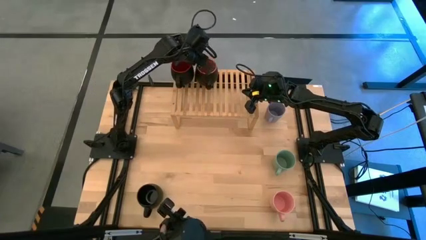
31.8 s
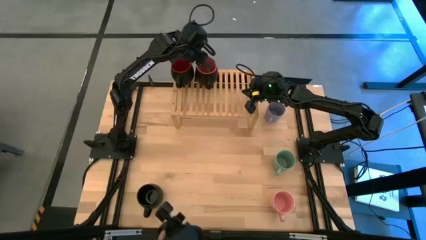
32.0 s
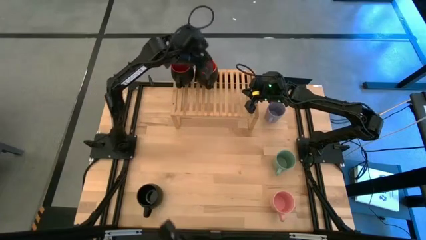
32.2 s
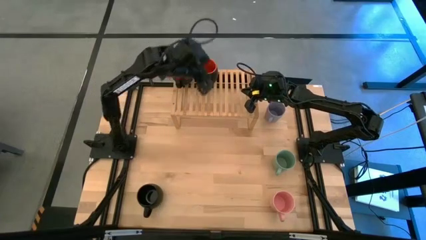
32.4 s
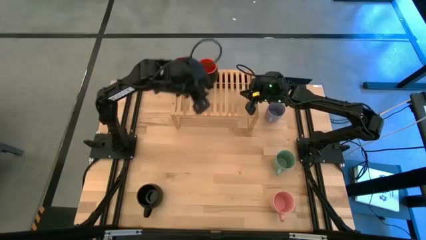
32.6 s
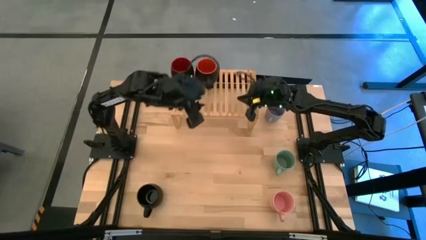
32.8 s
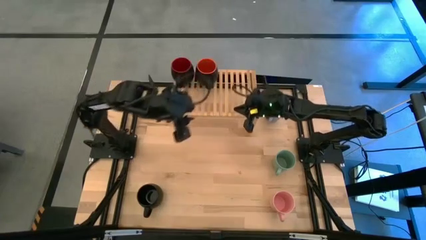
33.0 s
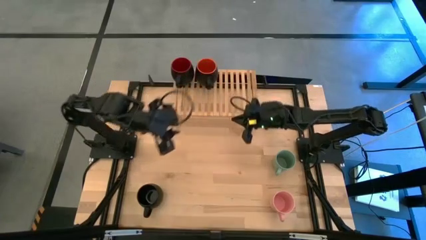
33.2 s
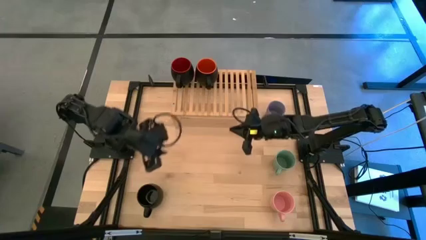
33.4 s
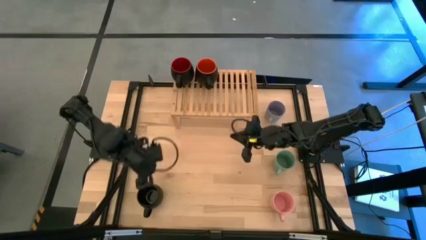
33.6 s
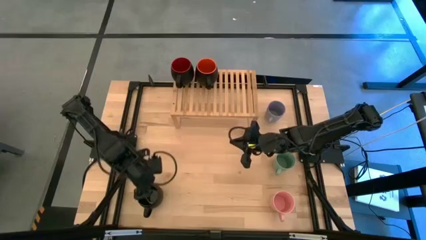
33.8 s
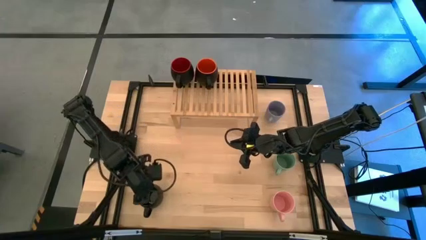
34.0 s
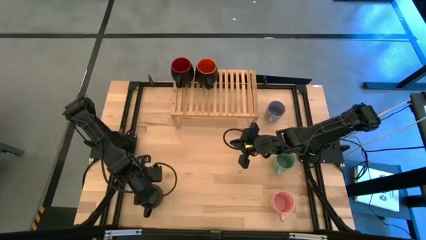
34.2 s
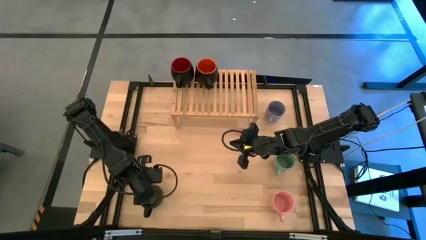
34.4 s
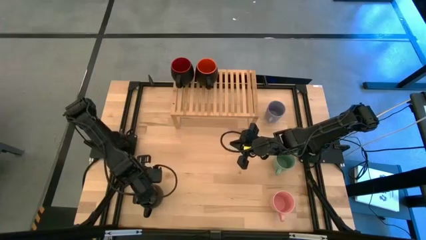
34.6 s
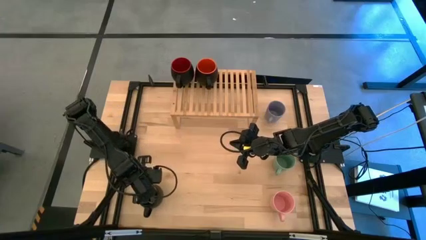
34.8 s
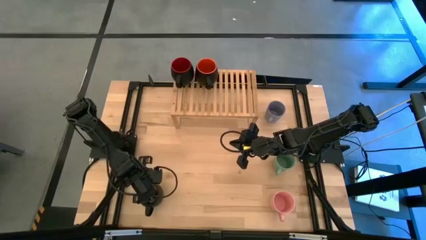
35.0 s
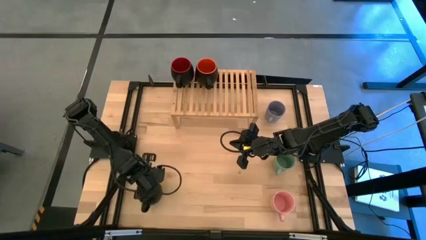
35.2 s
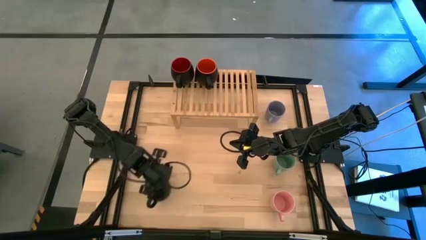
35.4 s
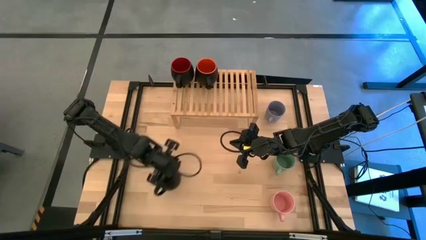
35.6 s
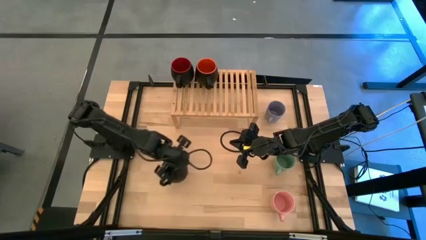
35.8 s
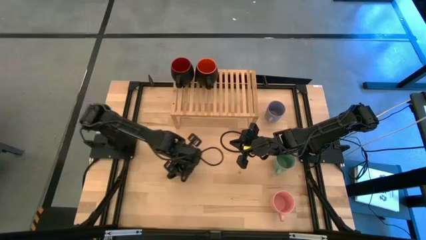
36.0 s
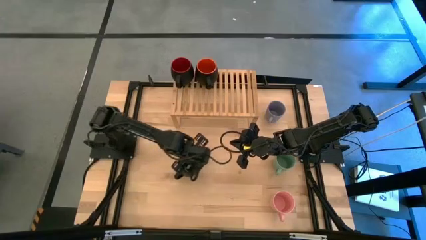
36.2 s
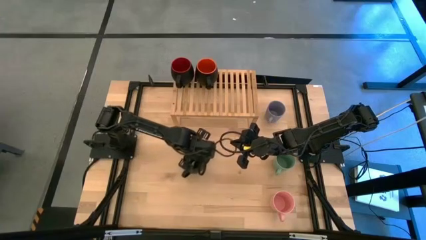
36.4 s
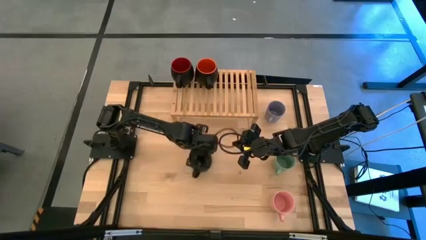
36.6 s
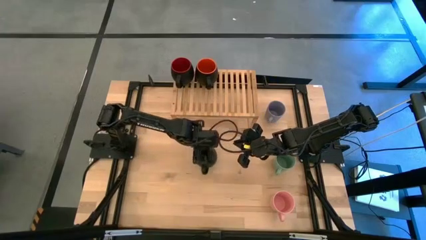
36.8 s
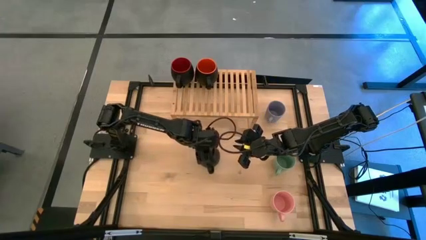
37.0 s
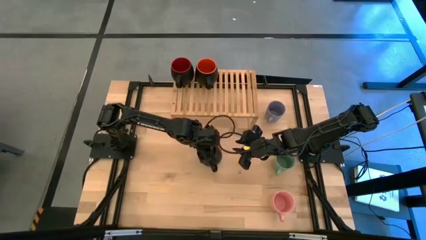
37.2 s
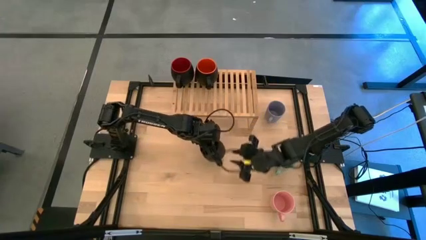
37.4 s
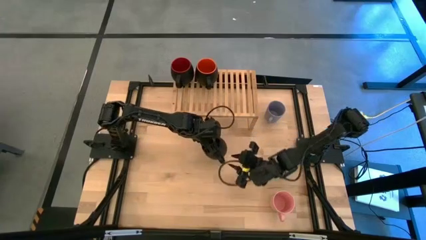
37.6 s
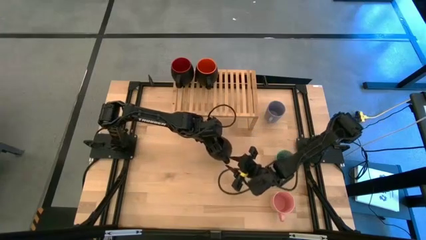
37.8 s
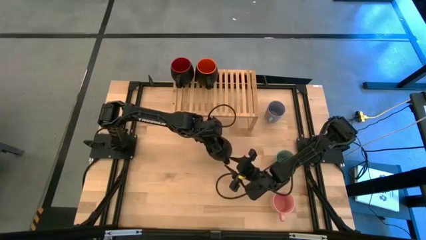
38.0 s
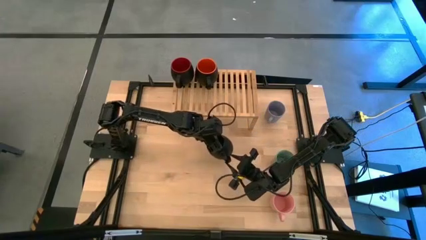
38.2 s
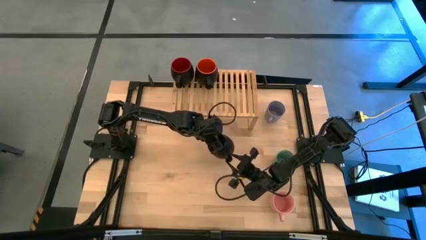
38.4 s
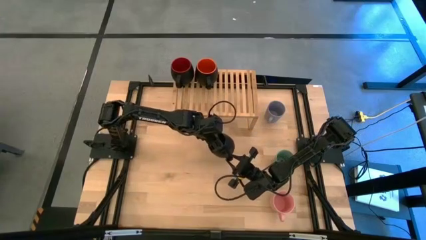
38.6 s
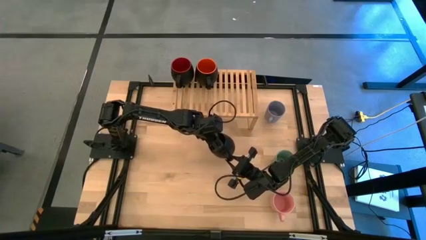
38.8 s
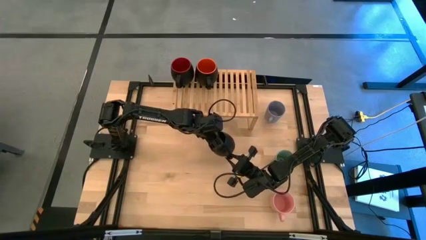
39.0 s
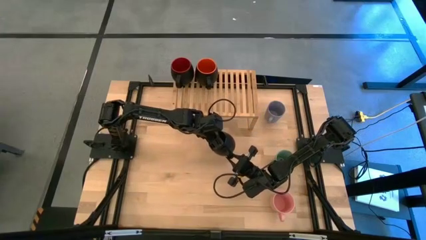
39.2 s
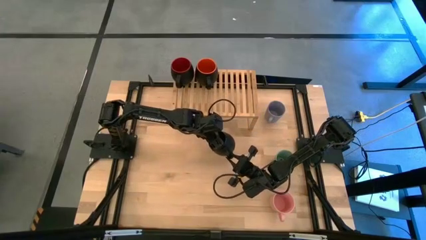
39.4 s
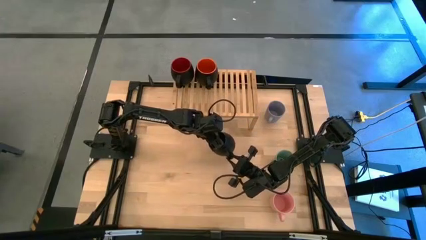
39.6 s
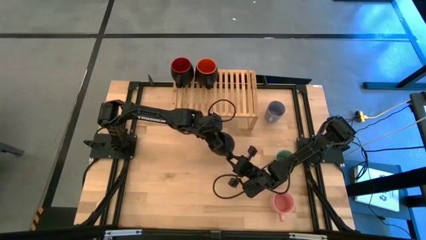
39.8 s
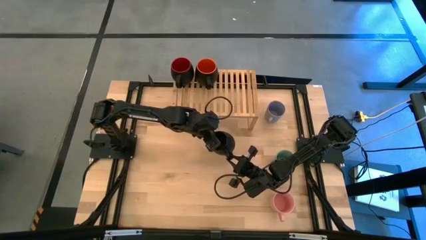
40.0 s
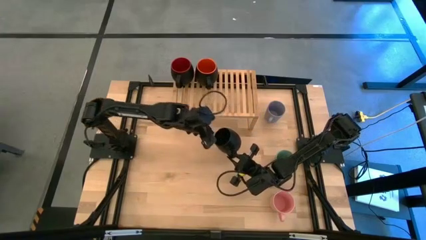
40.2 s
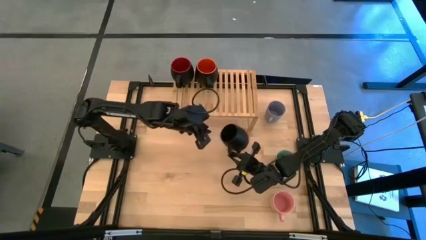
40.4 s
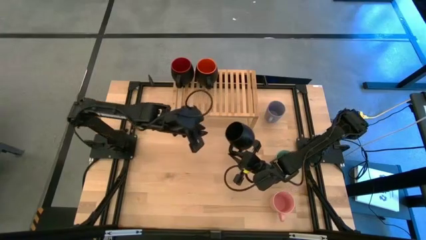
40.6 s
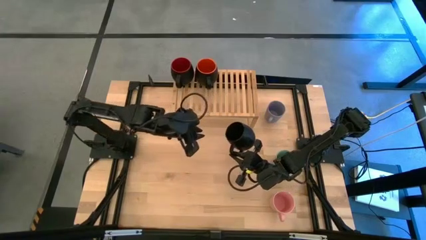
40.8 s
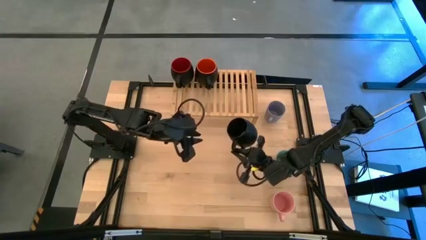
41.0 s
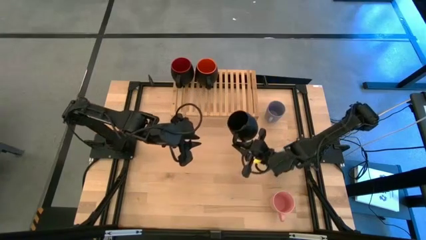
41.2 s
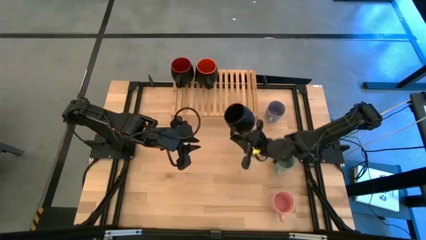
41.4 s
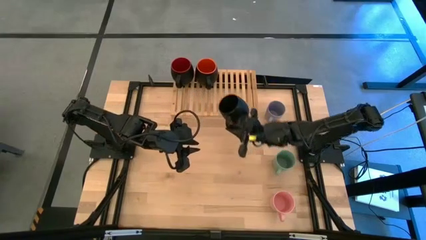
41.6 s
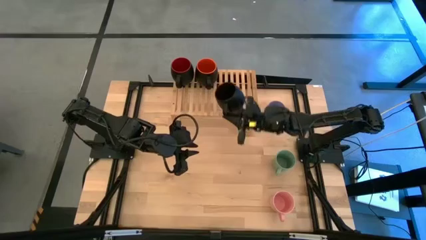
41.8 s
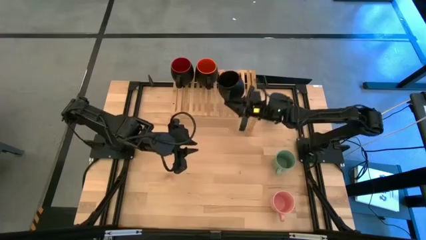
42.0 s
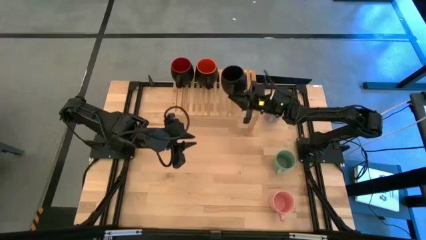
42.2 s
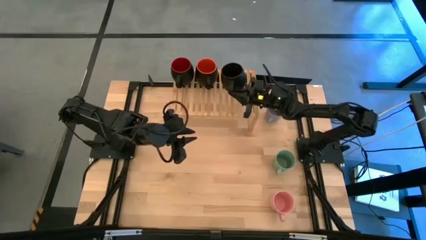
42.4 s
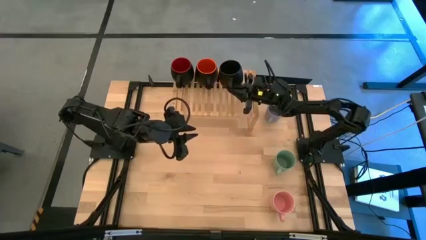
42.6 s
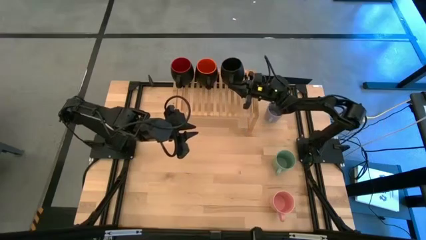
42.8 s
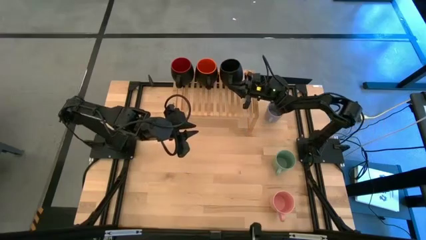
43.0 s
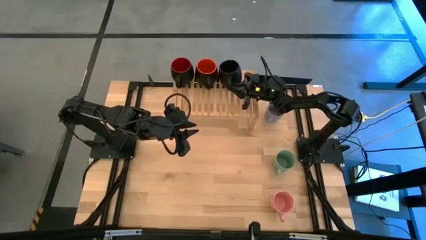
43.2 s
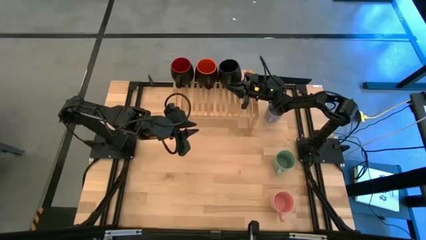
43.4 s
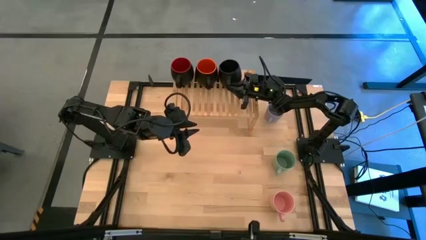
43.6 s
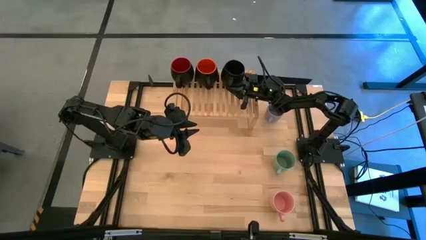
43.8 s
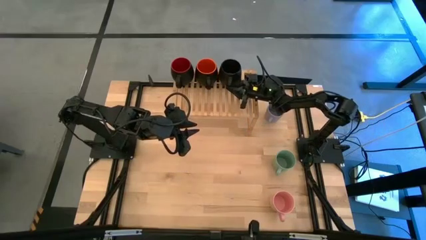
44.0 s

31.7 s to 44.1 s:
Task: Place coffee mugs
Put the black mug onto the shelf

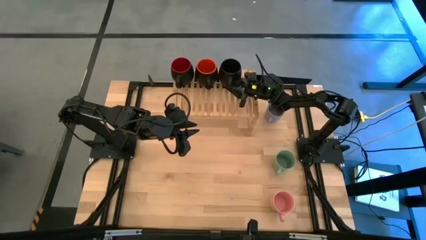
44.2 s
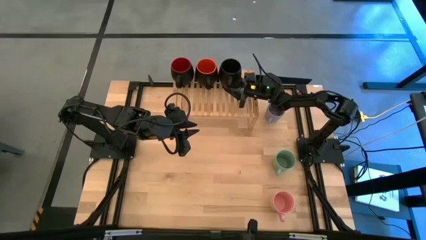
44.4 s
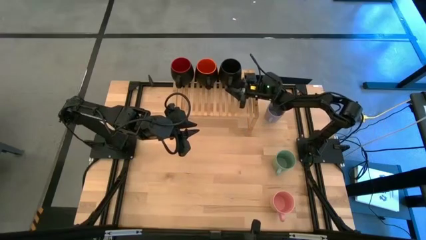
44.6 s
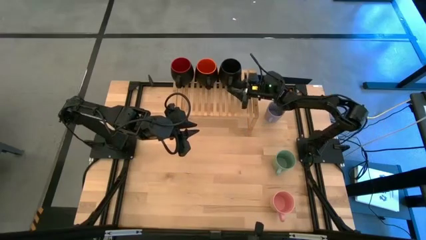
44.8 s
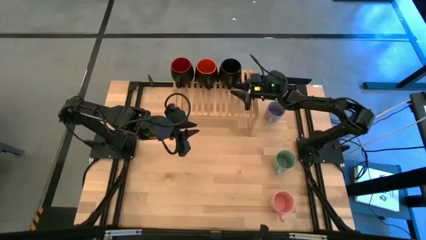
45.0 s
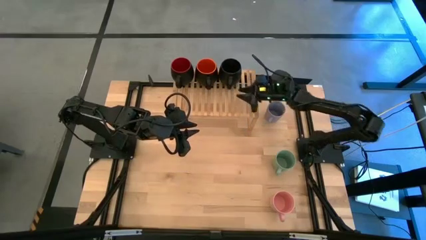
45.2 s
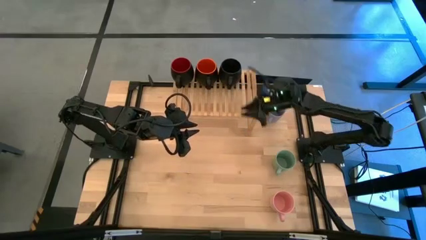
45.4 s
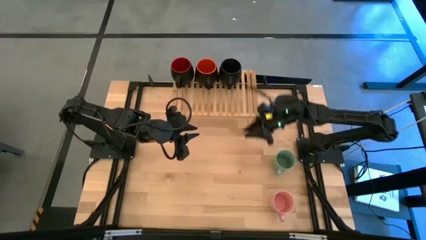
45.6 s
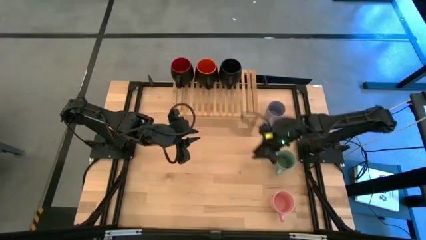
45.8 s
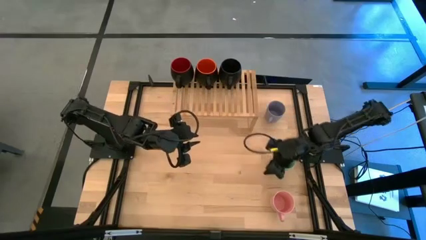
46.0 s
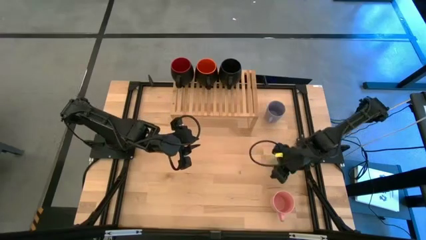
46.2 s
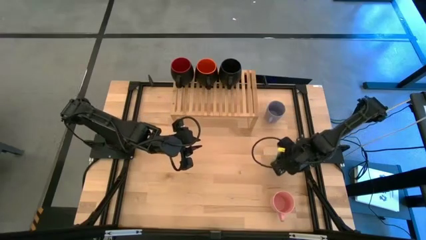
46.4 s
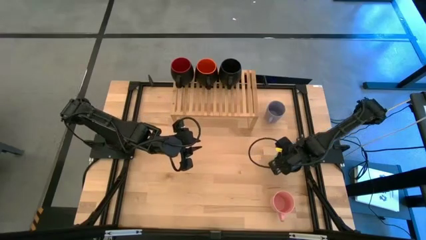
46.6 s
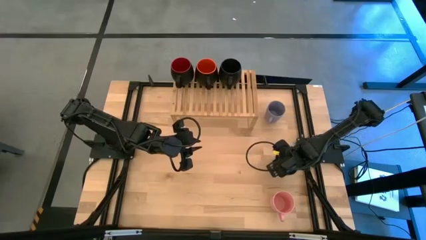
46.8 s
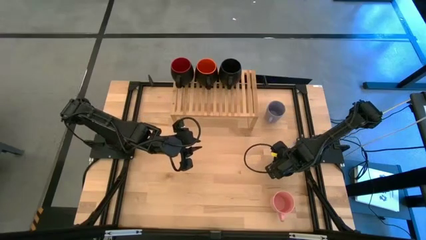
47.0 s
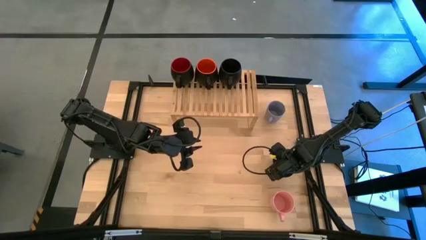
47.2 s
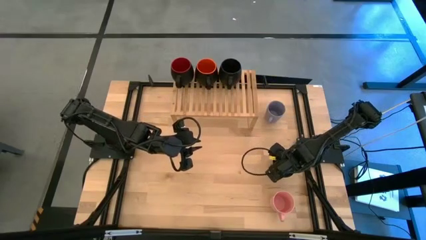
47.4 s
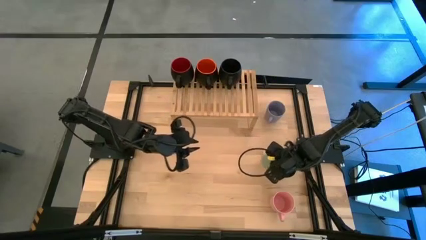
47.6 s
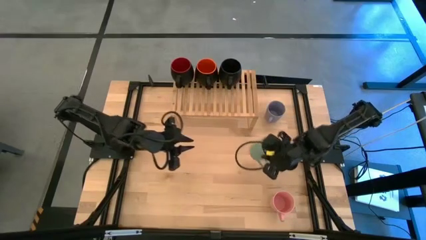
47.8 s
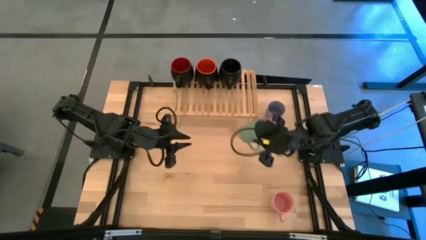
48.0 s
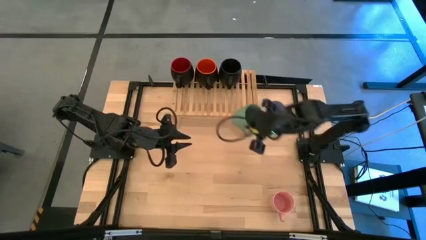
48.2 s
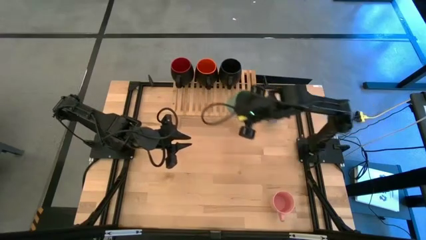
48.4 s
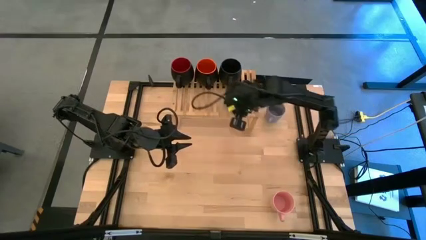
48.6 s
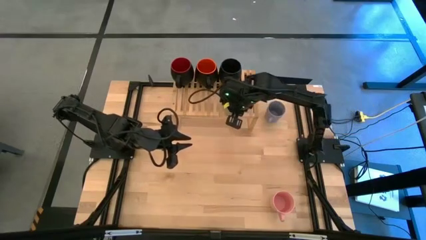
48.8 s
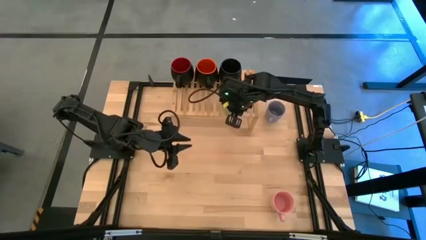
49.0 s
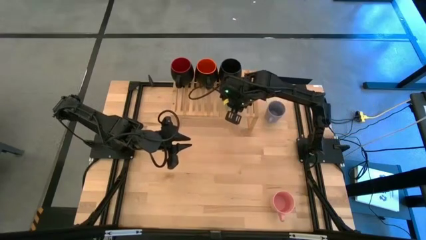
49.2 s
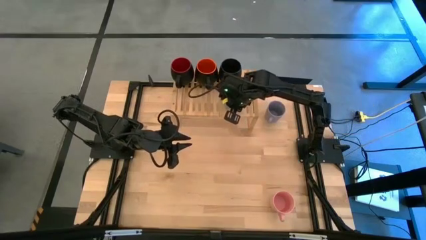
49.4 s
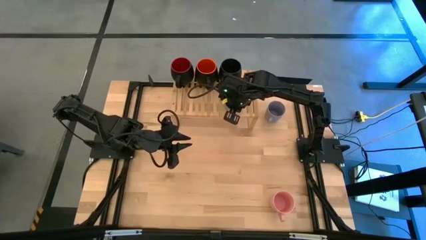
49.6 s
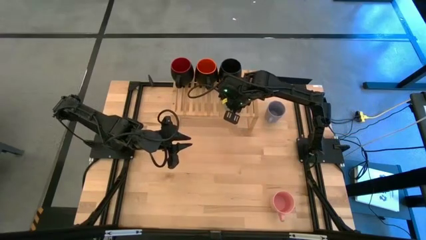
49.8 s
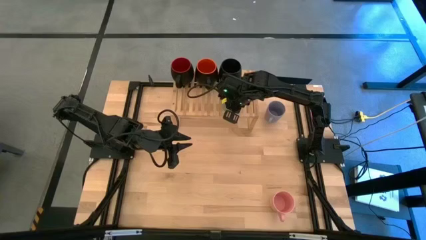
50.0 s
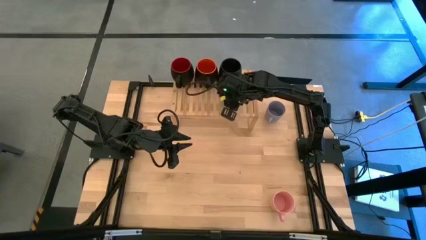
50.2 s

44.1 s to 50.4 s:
Put the light blue mug onto the shelf
